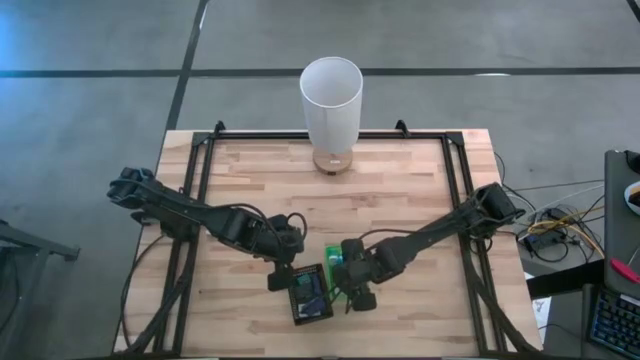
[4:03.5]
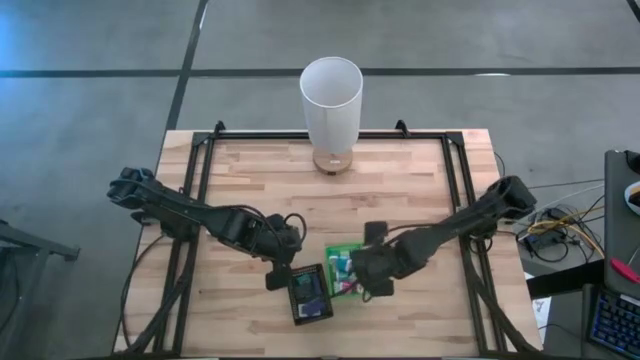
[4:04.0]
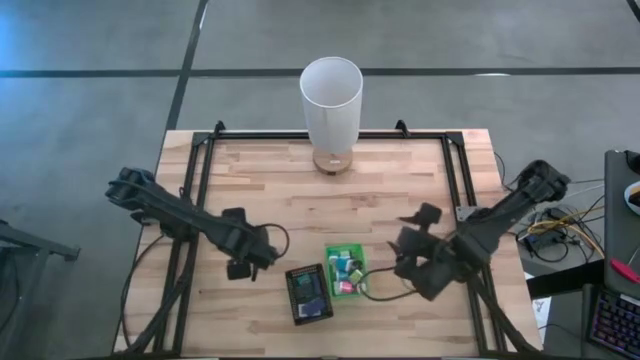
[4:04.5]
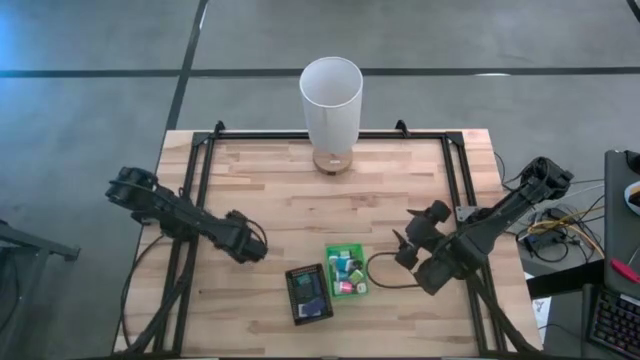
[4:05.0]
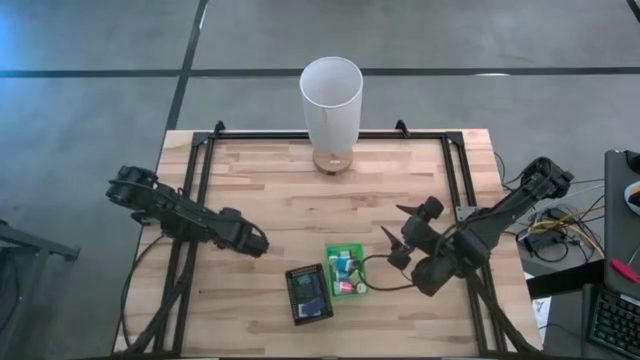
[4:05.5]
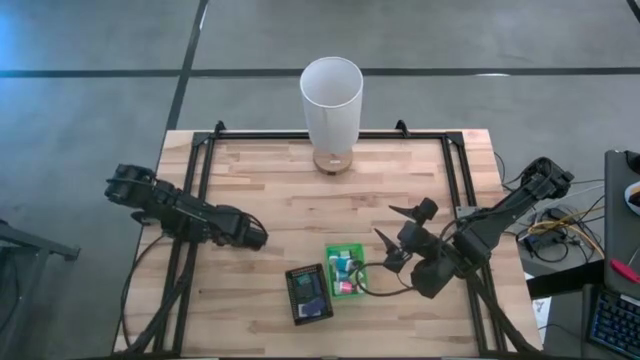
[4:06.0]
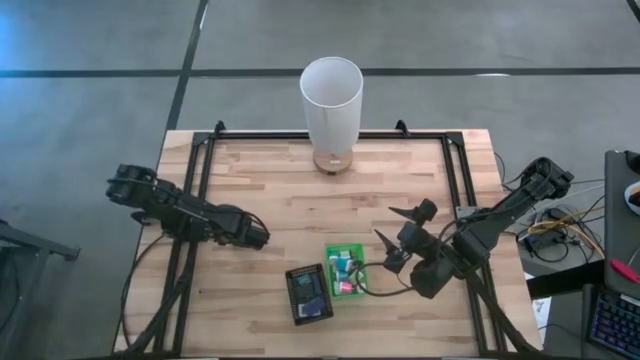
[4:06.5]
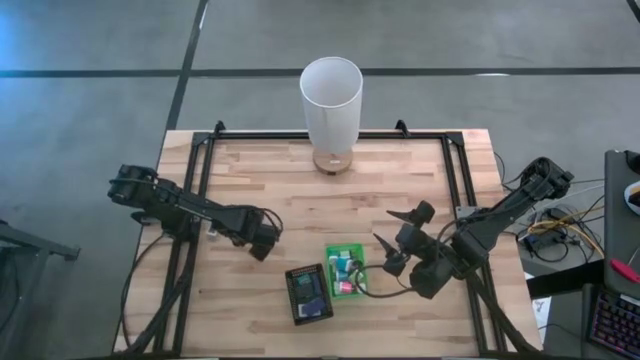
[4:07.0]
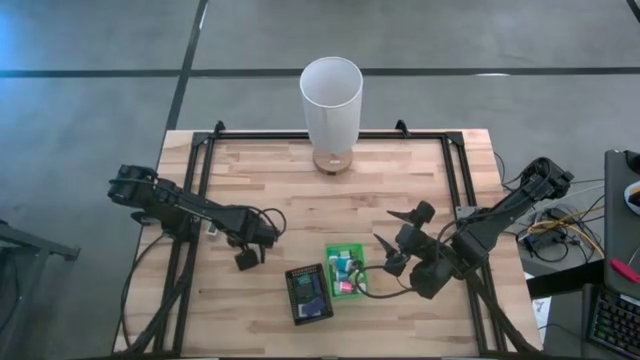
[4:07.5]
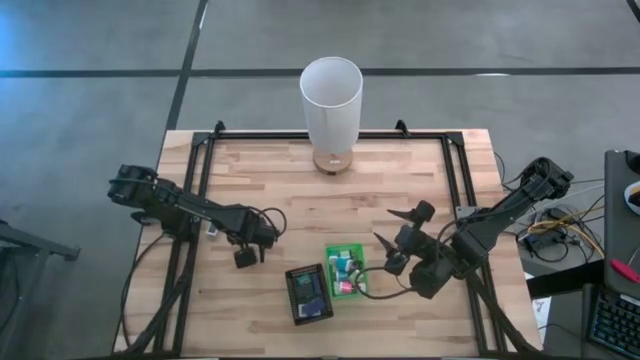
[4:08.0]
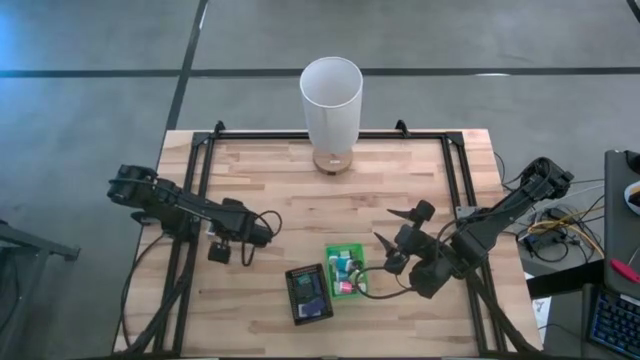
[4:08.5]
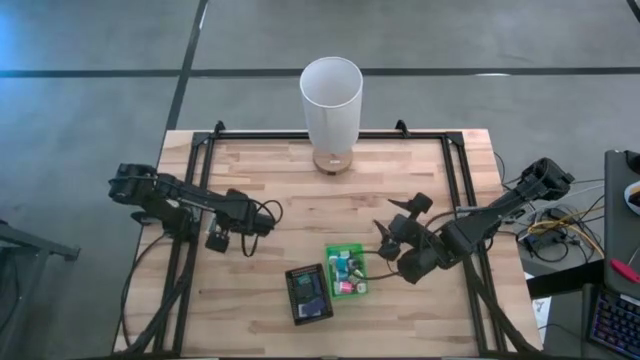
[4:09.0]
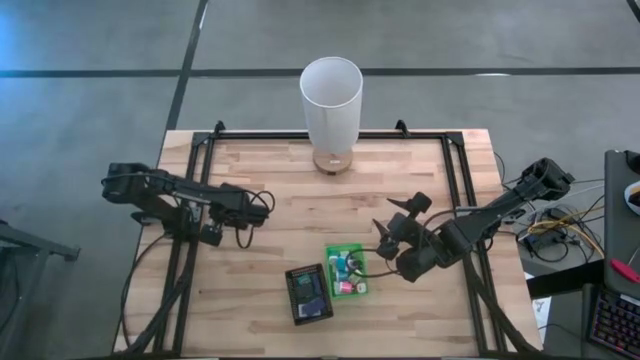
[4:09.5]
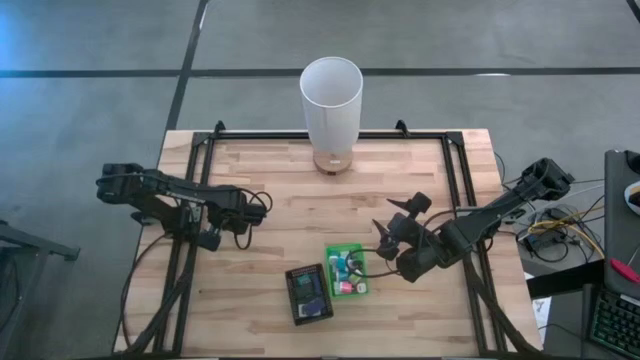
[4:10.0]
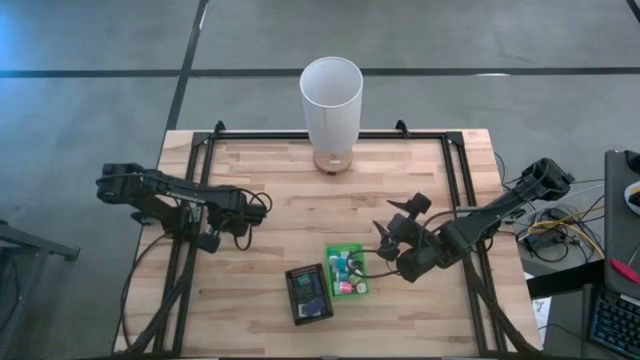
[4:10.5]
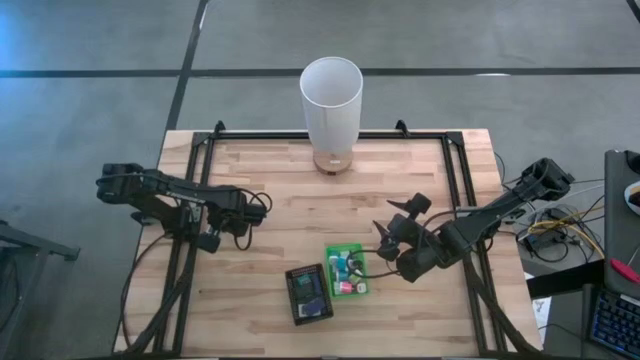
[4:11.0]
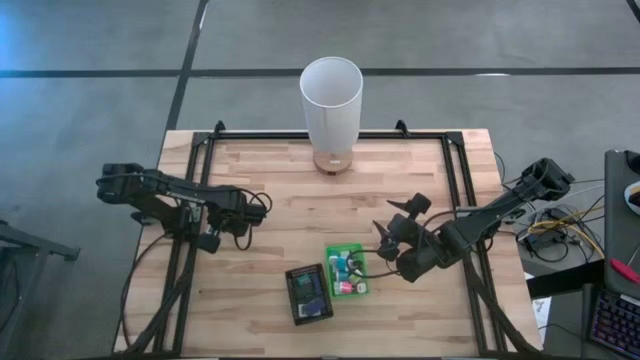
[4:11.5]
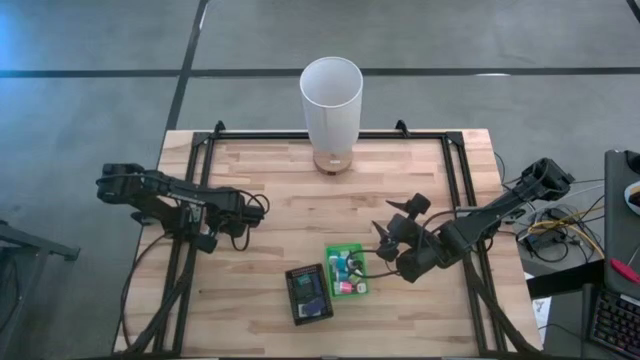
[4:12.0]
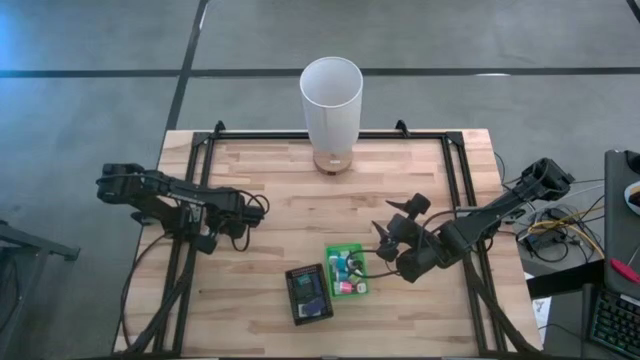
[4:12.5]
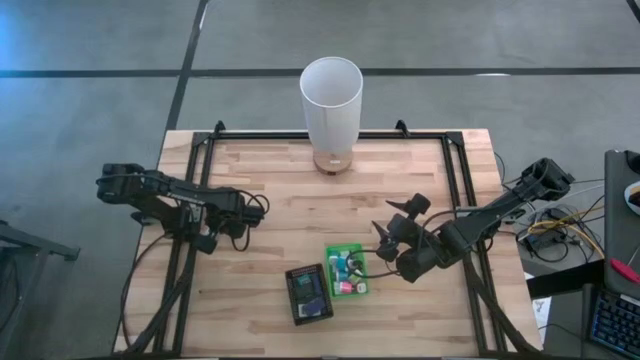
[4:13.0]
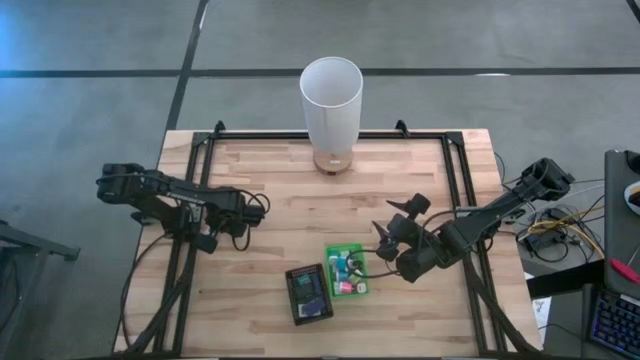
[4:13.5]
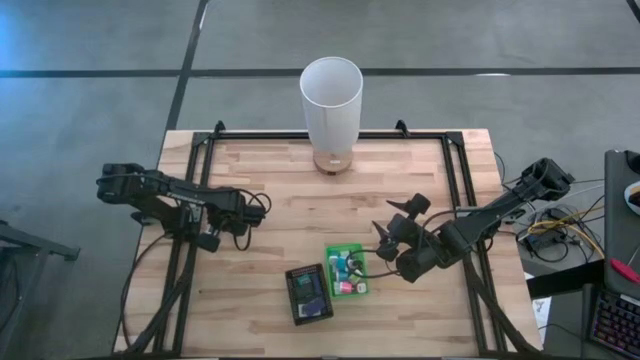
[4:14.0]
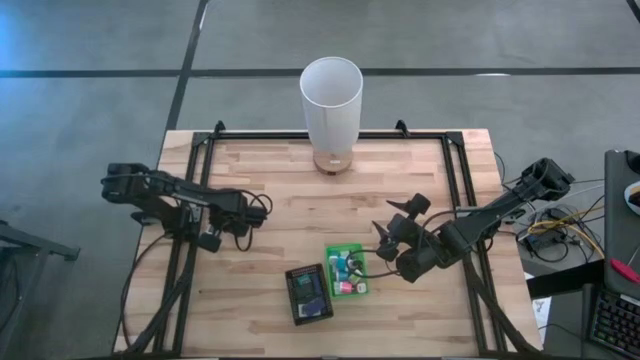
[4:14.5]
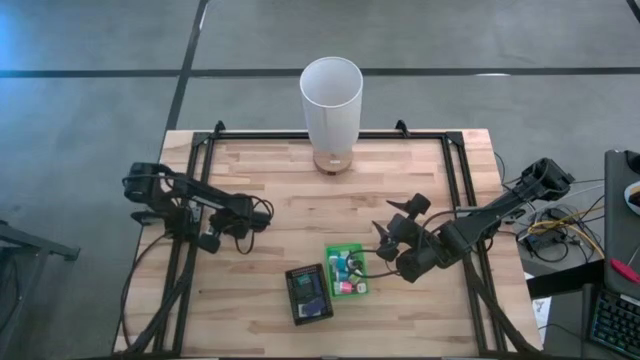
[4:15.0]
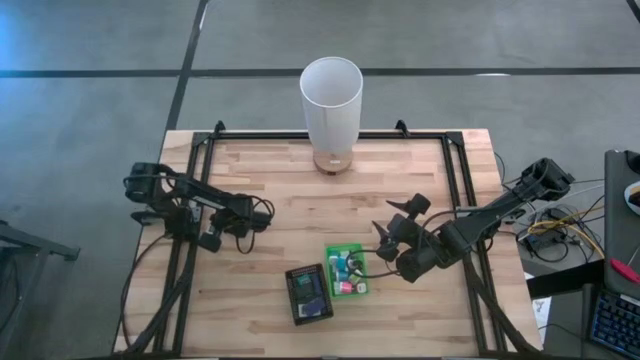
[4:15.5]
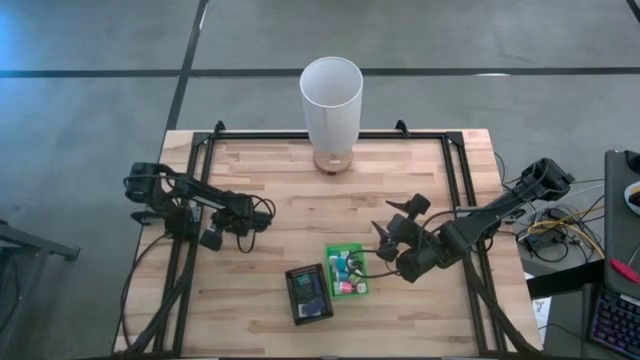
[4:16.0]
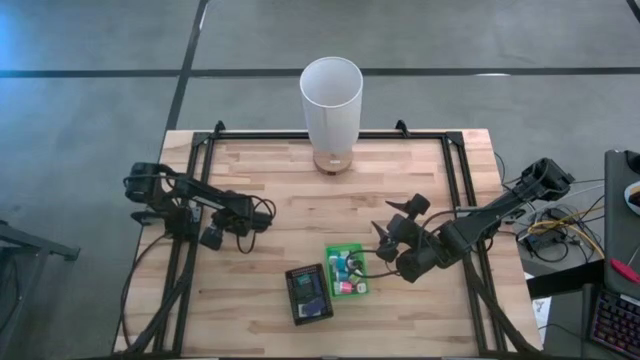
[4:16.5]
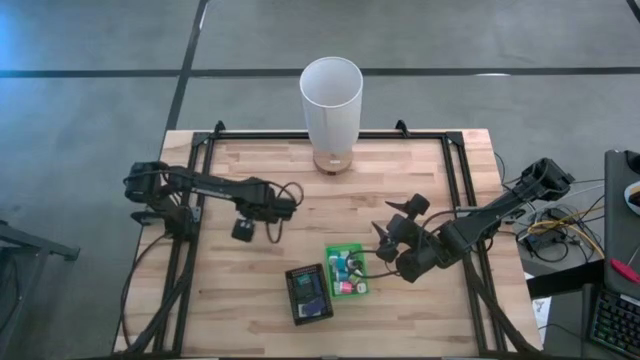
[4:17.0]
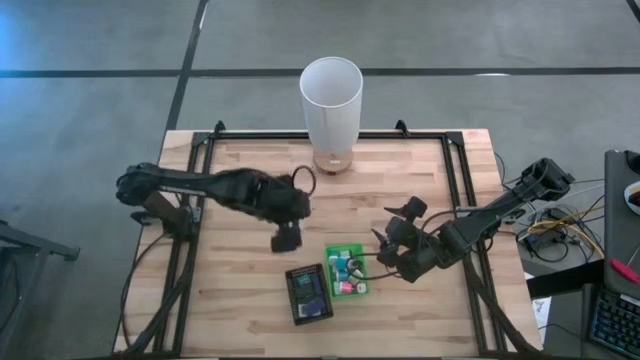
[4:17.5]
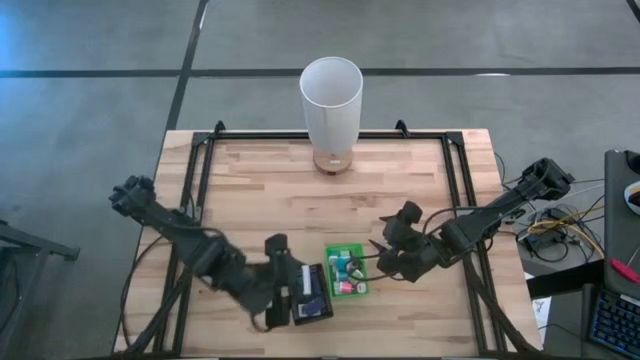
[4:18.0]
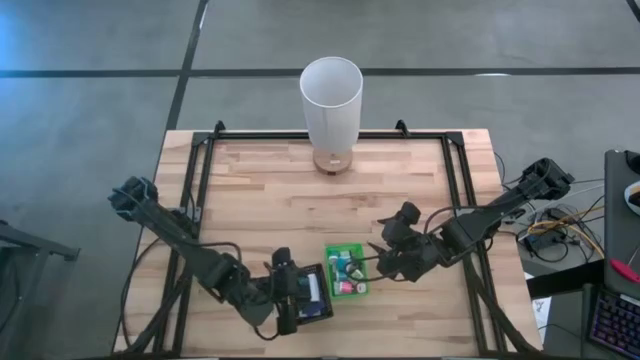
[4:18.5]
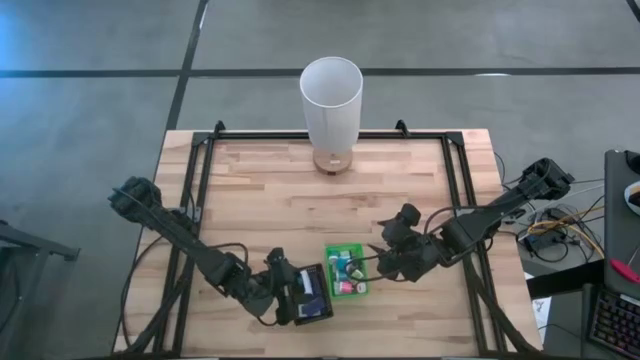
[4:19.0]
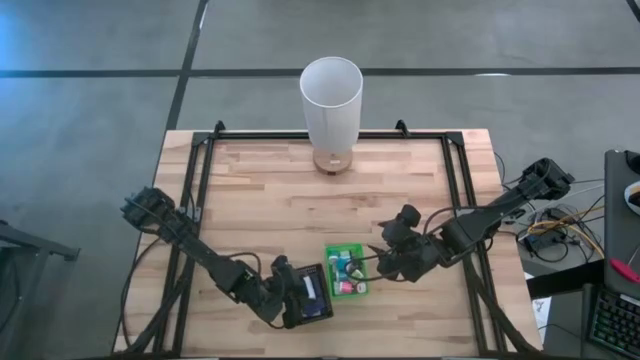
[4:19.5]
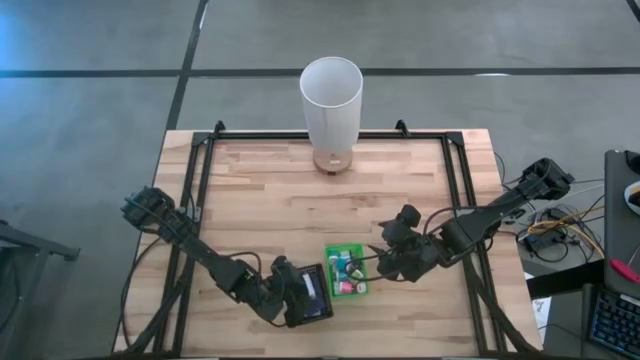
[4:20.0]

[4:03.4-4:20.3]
Task: Pick & Place Office items
Put the white digital clock into the black bin

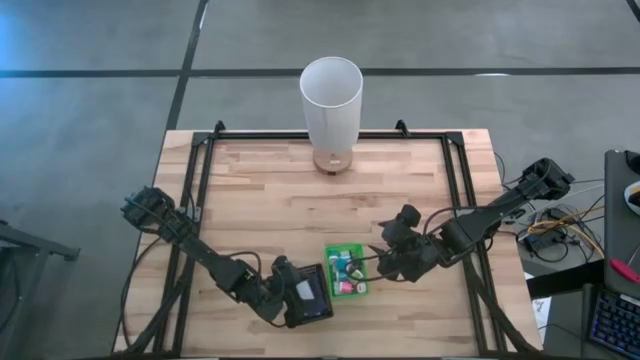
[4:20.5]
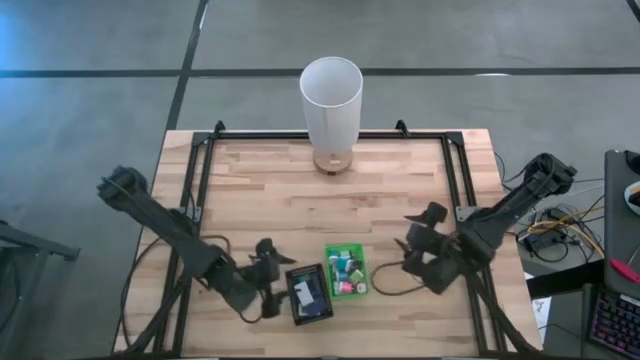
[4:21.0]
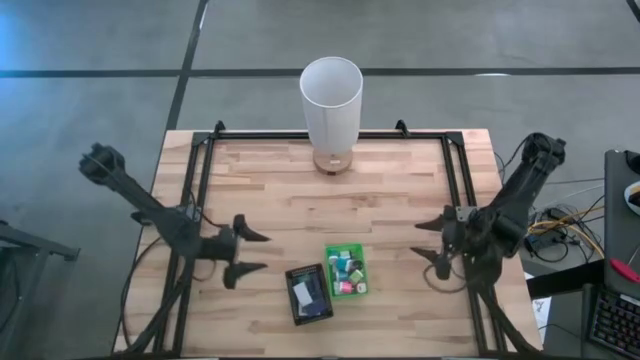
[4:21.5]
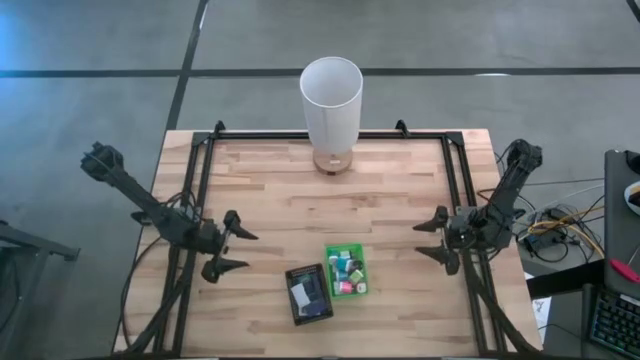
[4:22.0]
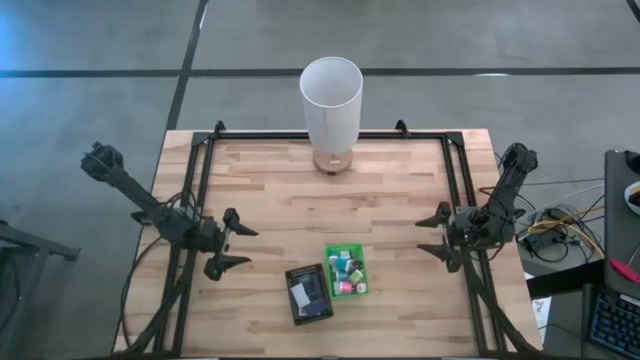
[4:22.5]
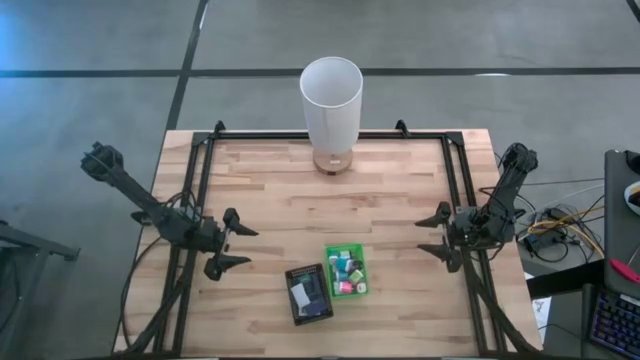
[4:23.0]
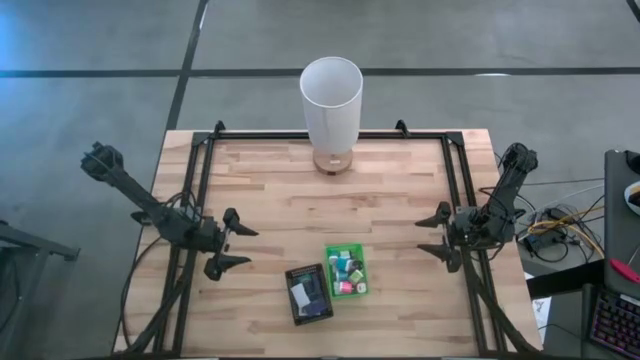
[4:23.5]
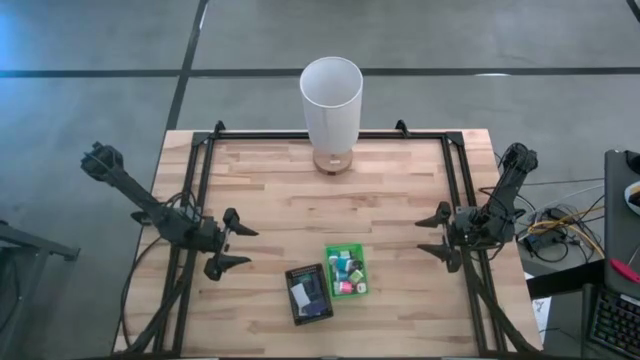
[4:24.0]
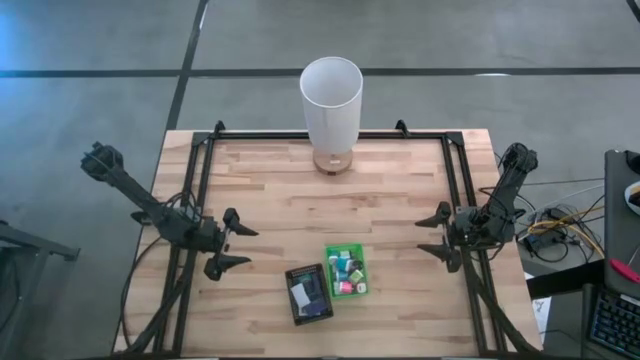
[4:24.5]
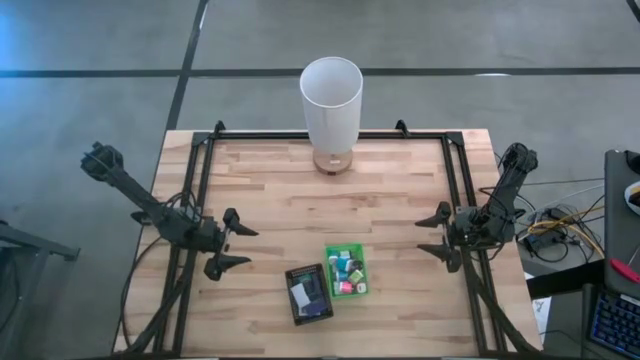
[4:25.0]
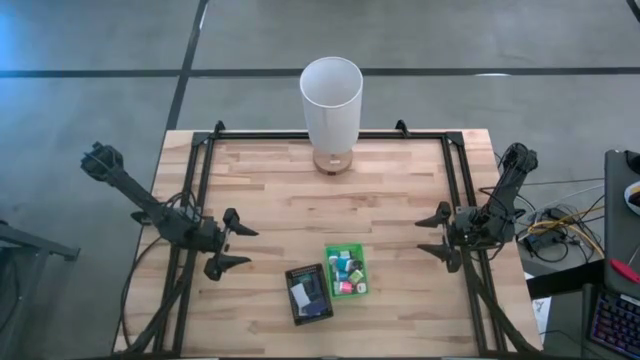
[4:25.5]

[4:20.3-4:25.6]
Return to Home Position
